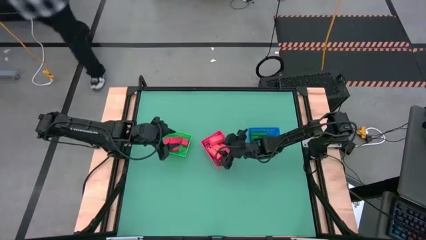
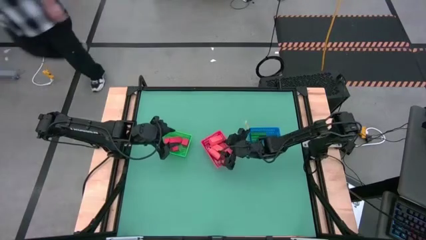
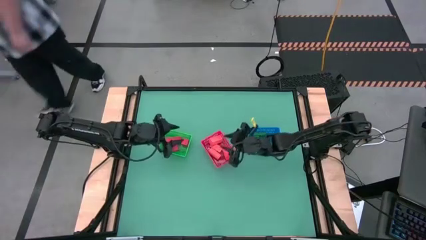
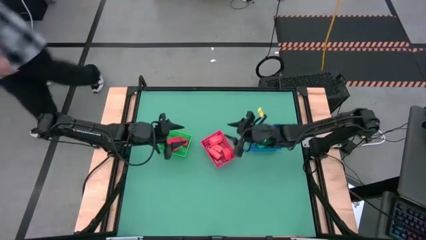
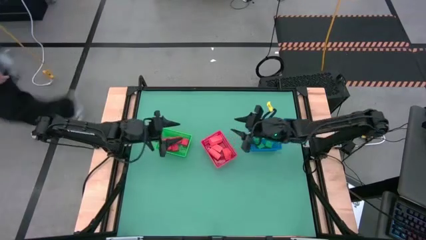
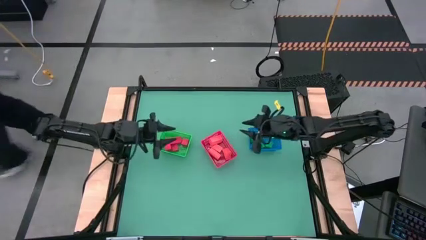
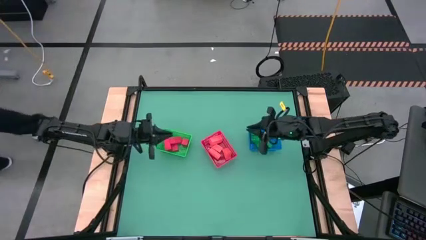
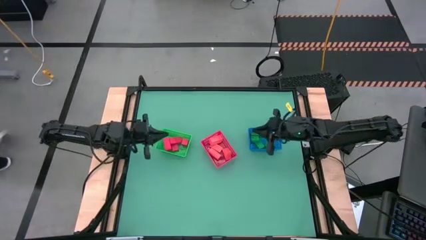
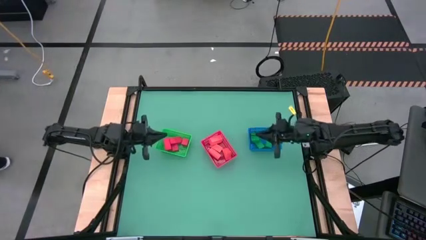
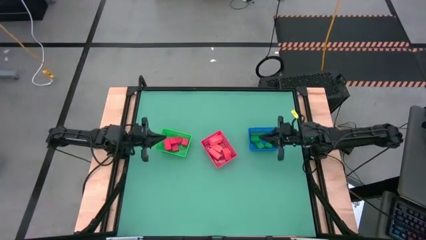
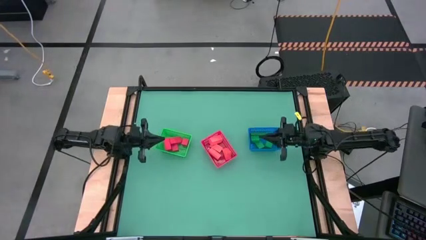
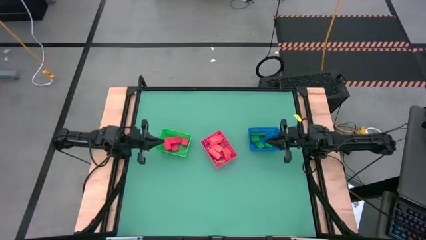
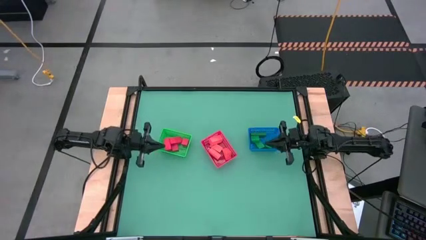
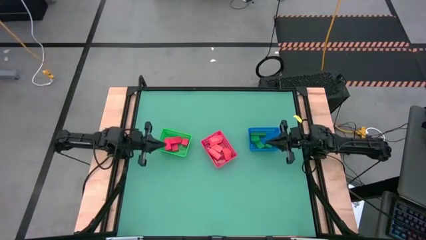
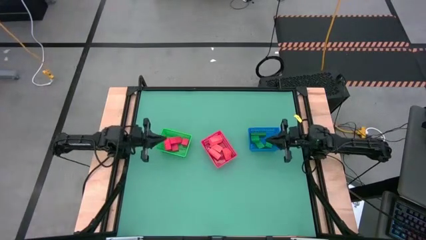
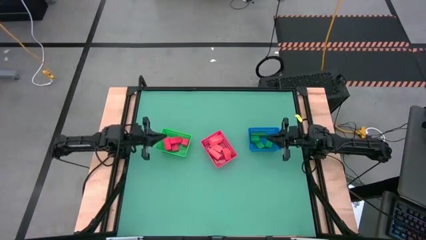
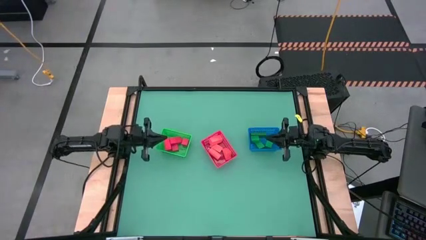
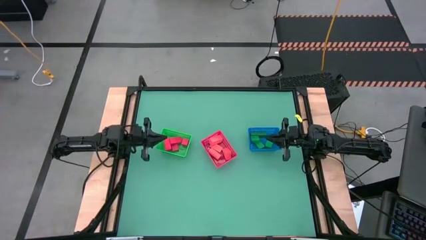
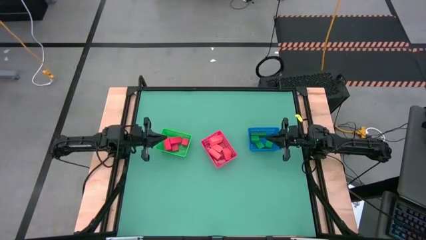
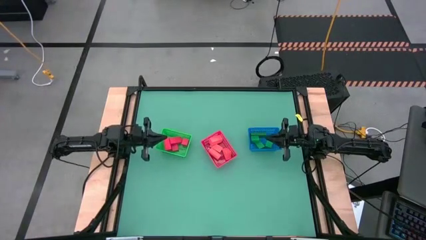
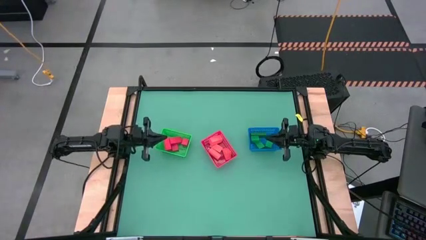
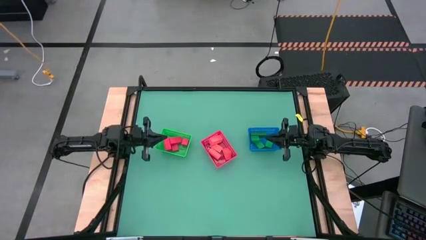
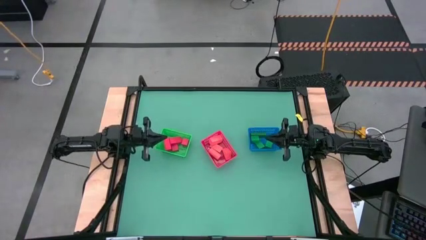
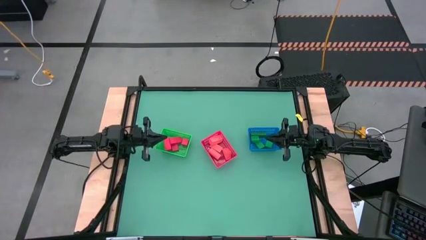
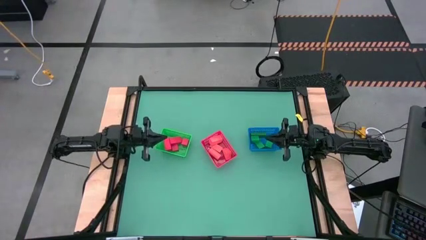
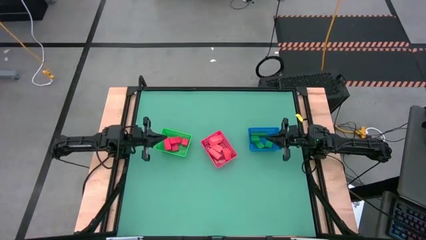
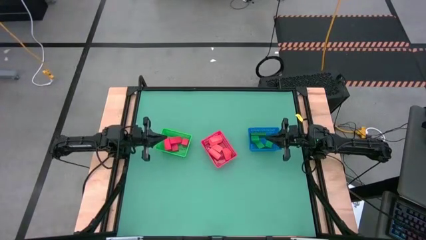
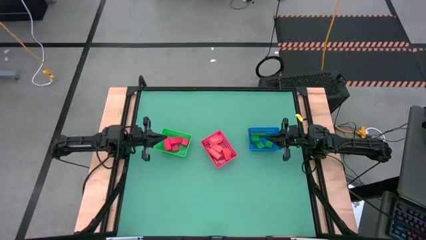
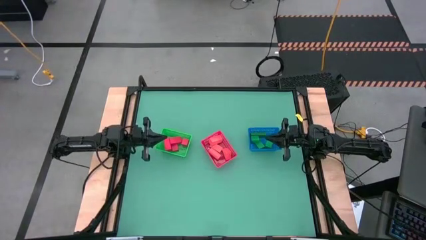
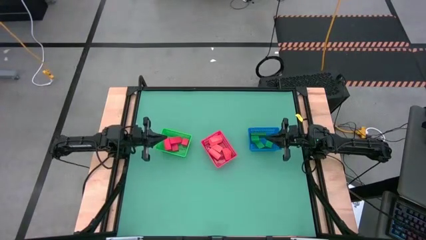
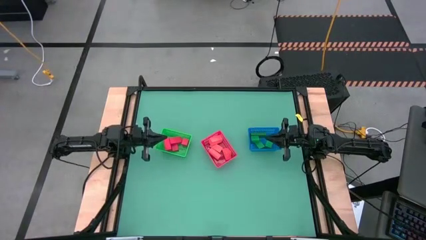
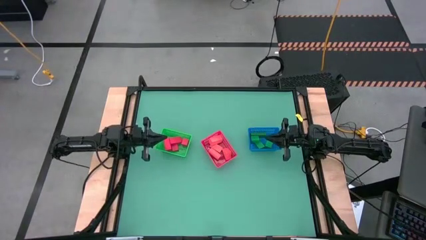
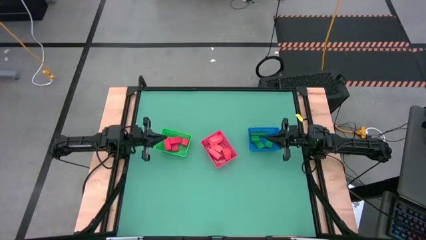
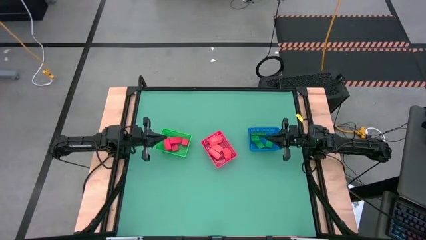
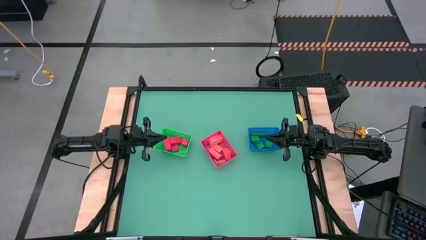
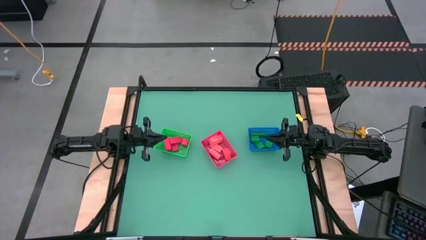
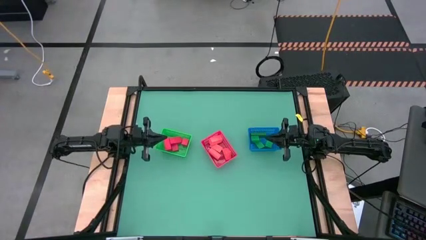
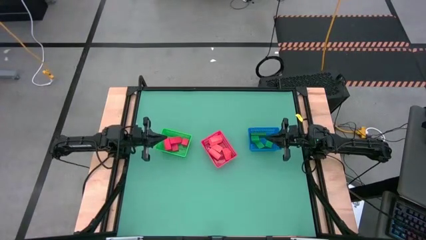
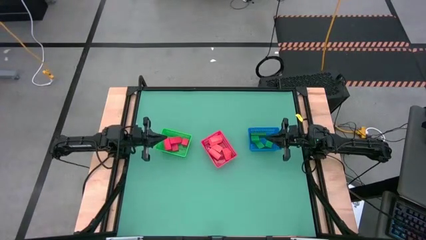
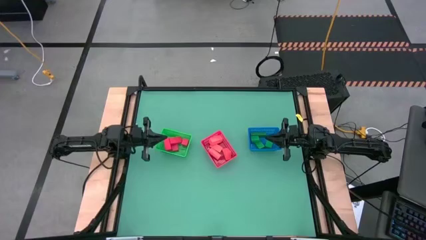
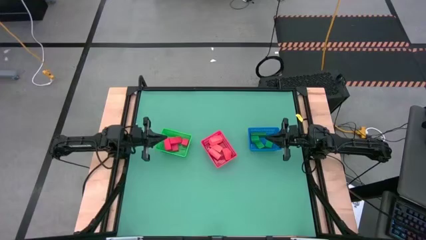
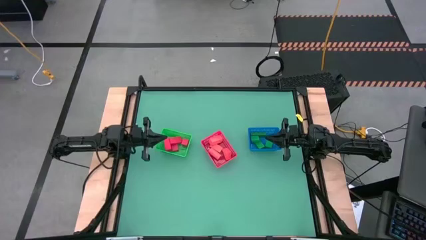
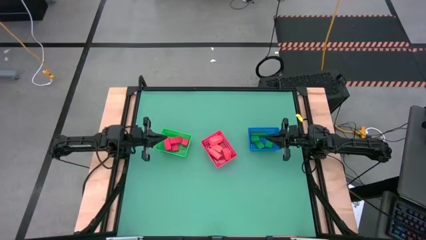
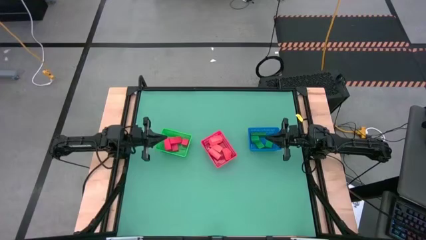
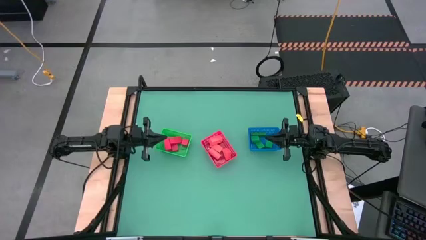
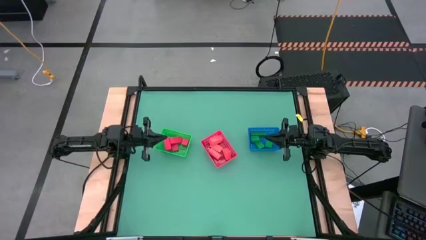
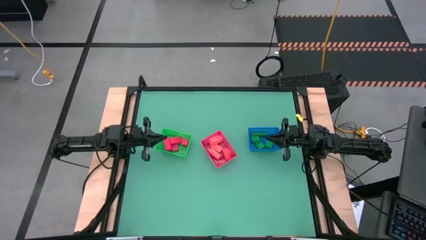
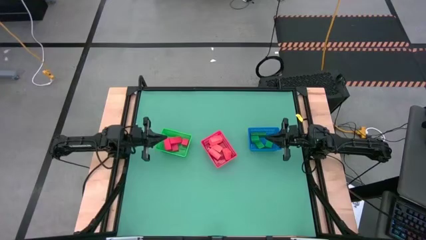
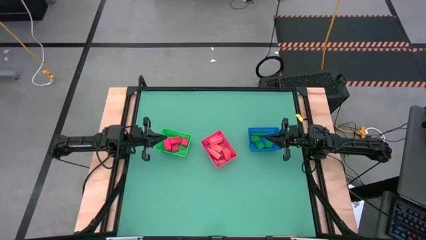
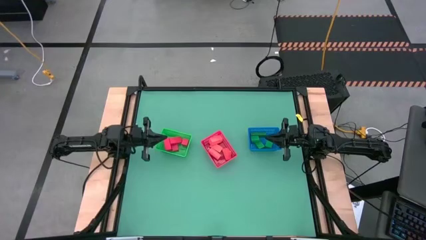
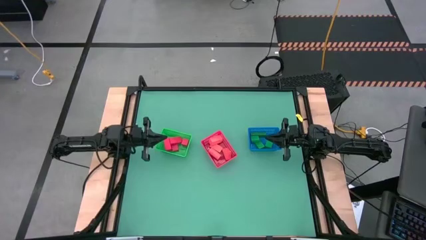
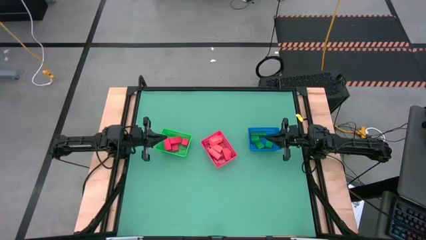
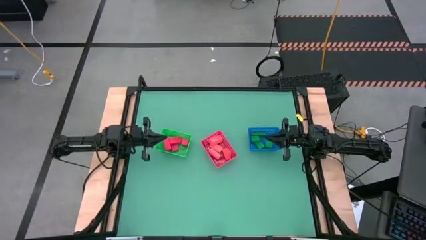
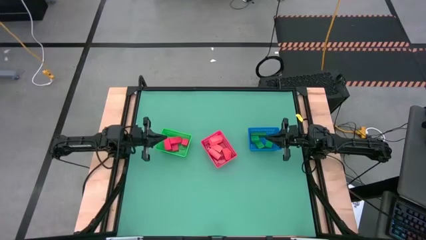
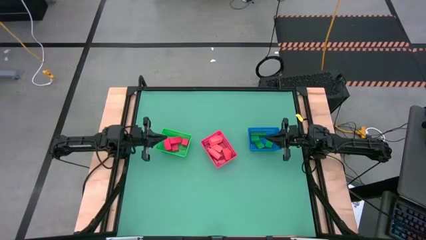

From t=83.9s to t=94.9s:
Task: Sort & place blocks by color
Return to Home Position

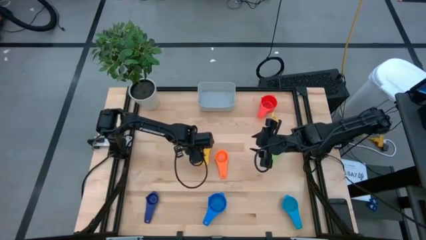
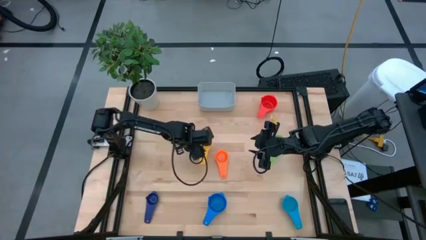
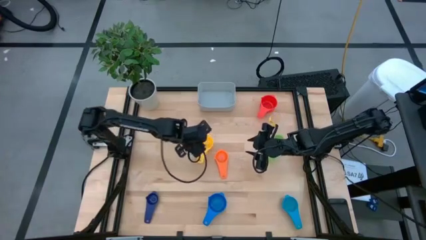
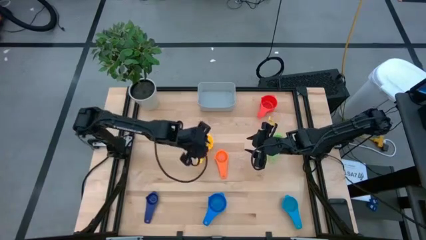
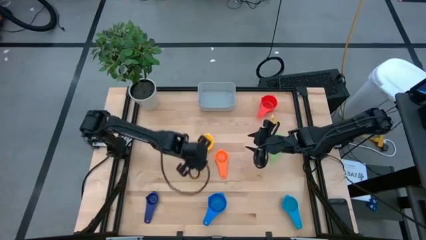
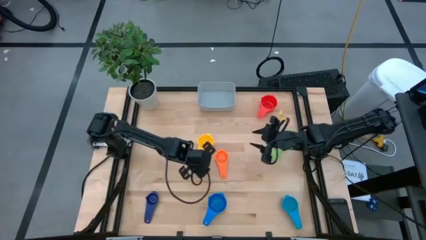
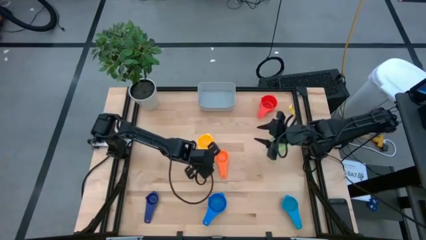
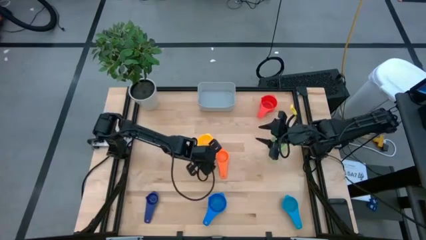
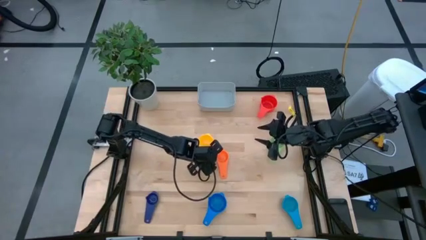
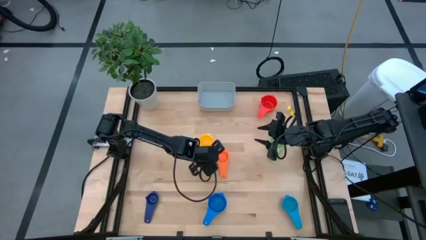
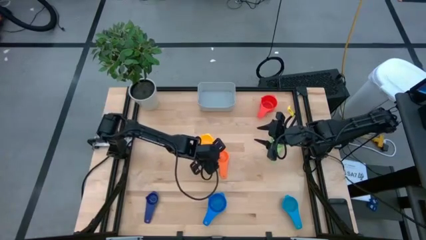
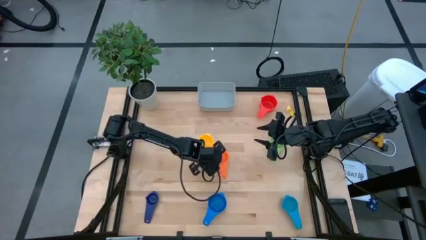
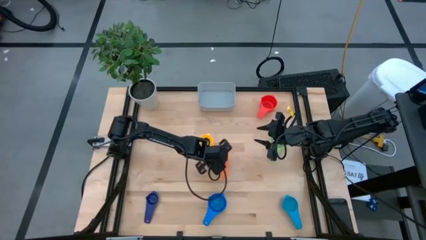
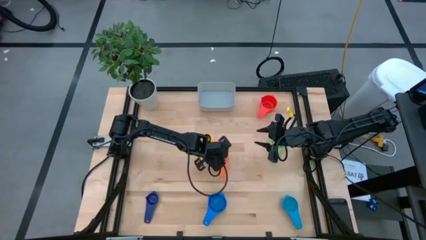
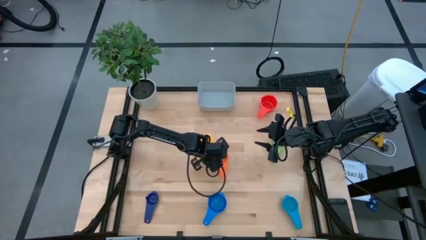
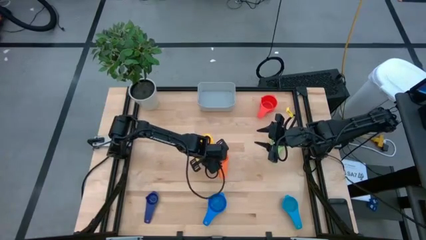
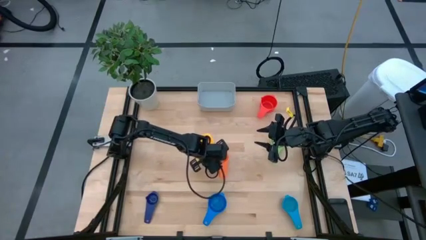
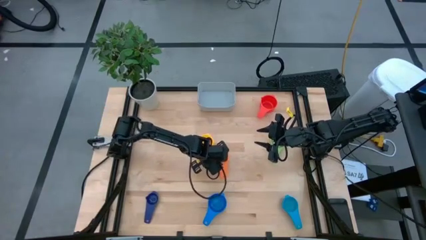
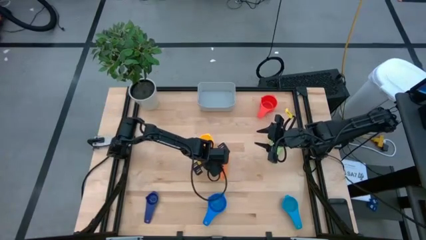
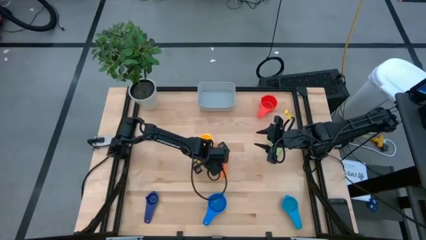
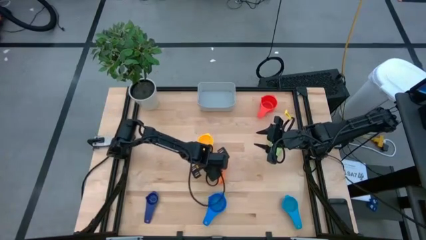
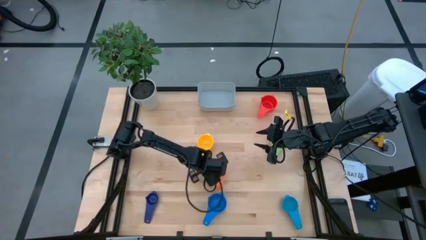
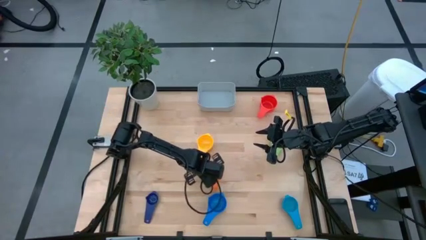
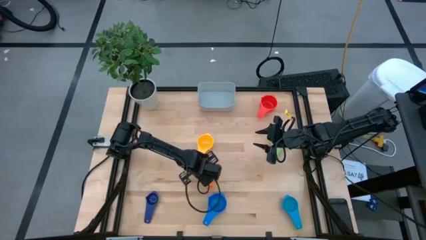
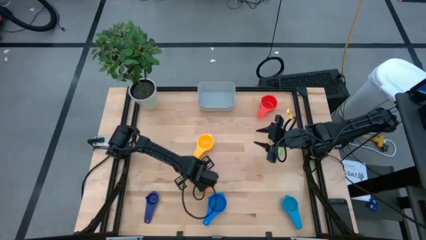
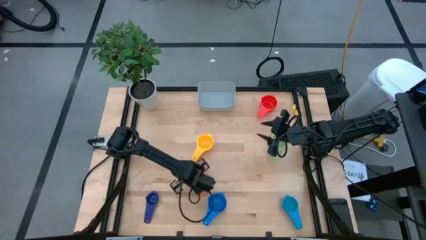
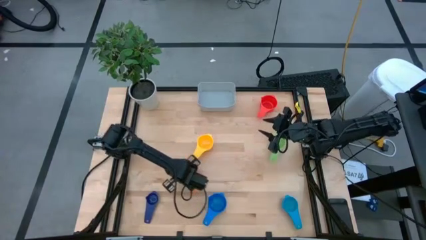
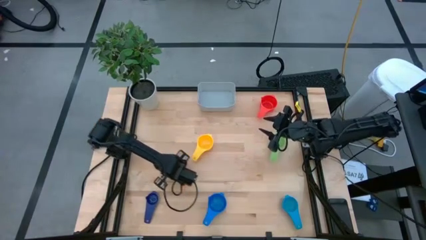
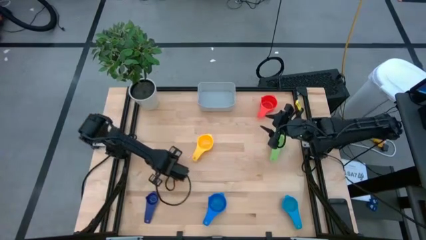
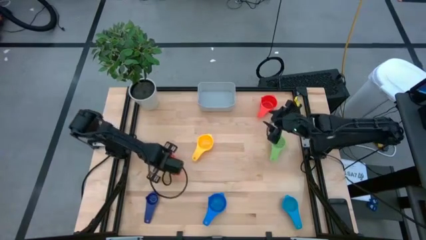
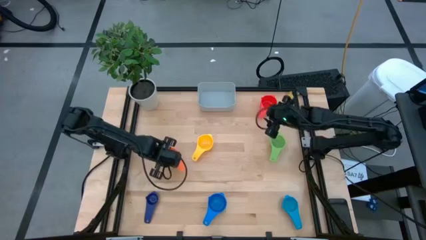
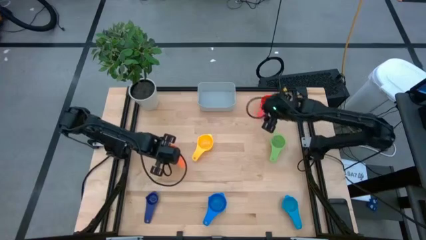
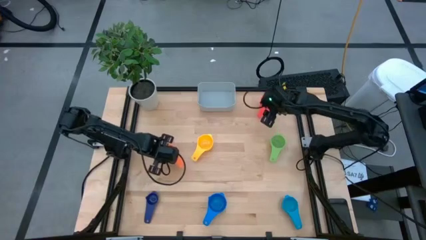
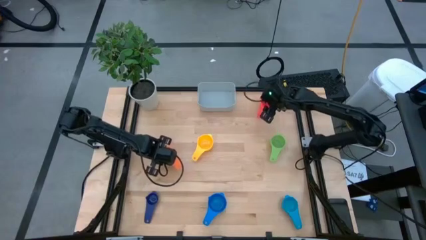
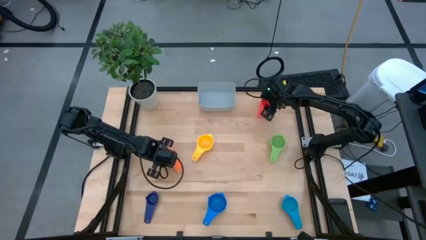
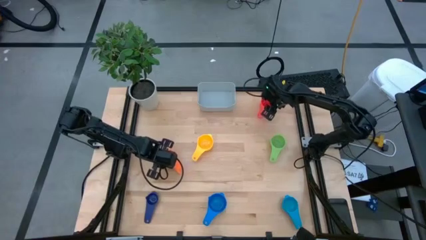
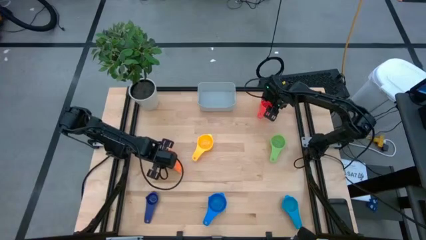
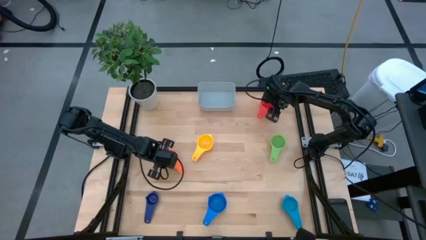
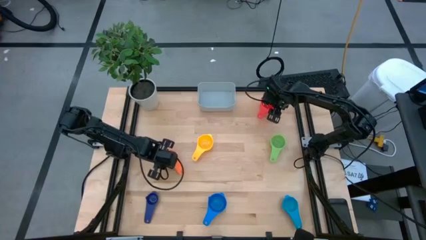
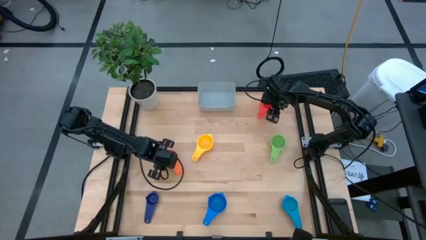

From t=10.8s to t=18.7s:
Task: Nest measuring cups in basket
Move the orange measuring cup to the middle left of the table
